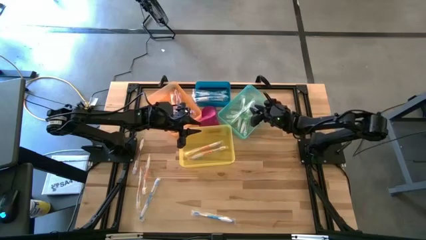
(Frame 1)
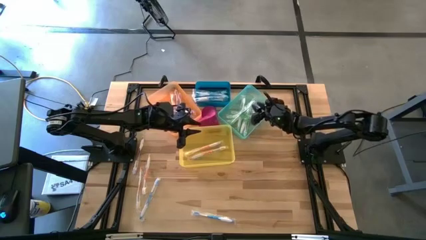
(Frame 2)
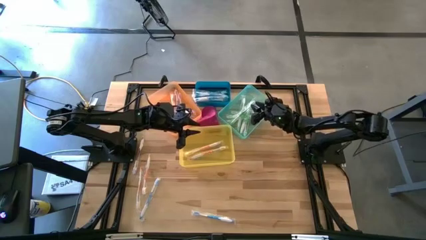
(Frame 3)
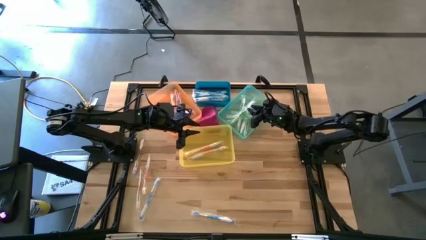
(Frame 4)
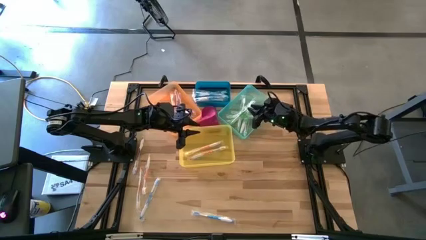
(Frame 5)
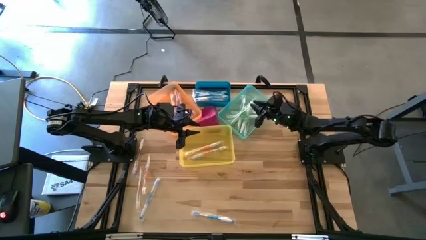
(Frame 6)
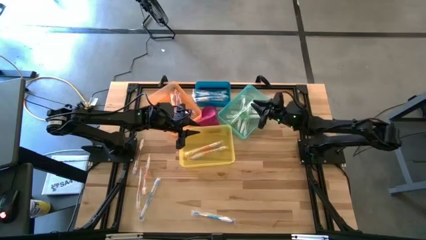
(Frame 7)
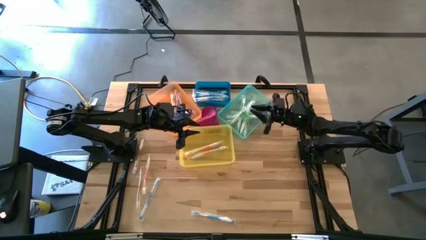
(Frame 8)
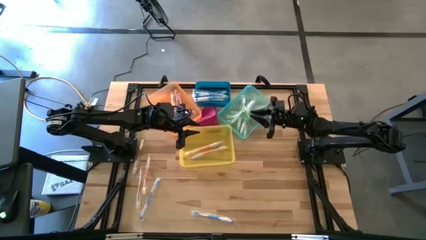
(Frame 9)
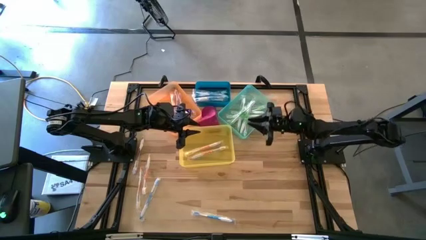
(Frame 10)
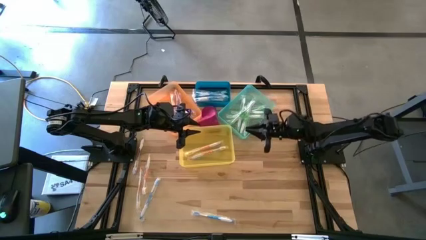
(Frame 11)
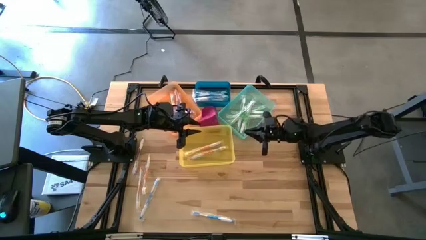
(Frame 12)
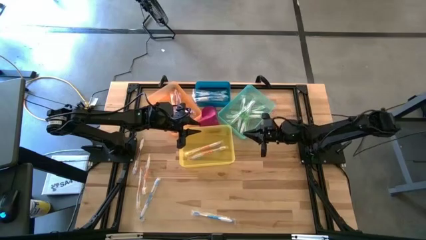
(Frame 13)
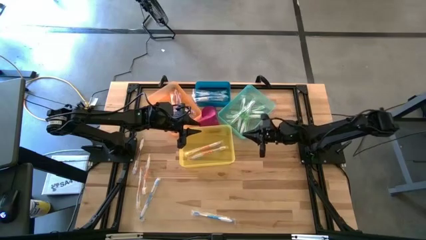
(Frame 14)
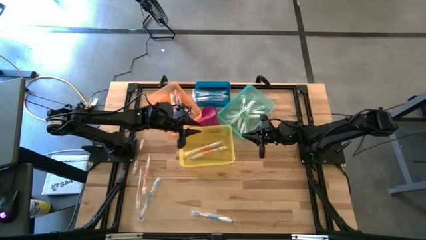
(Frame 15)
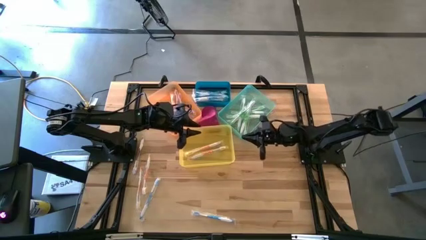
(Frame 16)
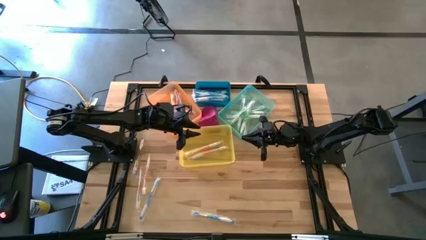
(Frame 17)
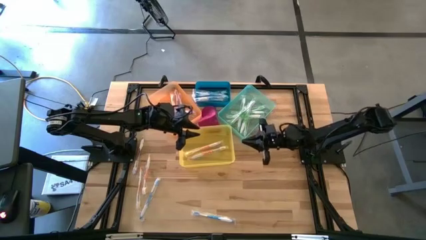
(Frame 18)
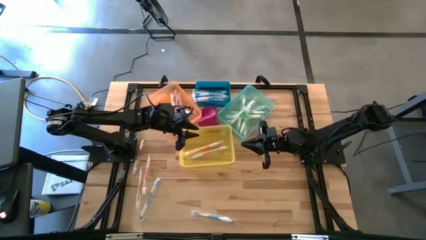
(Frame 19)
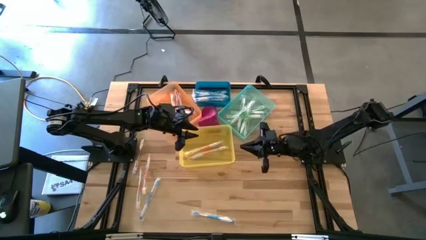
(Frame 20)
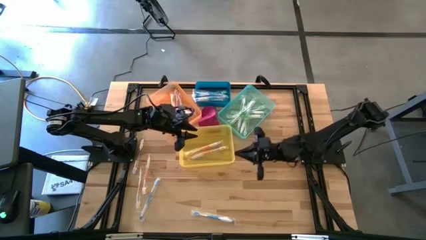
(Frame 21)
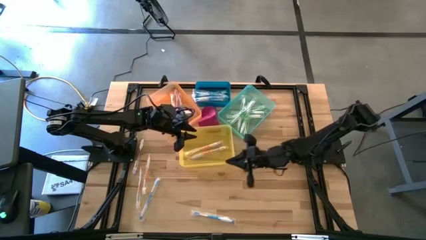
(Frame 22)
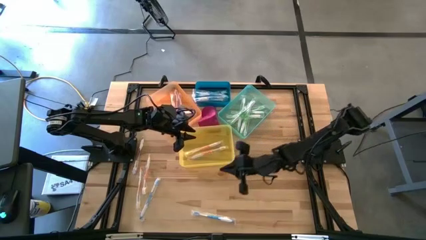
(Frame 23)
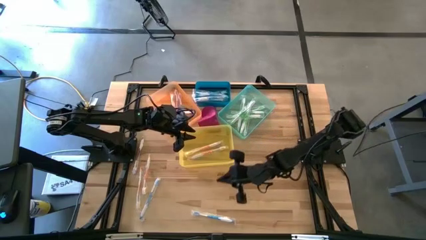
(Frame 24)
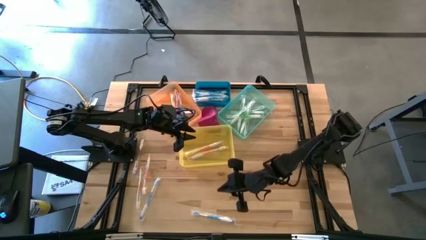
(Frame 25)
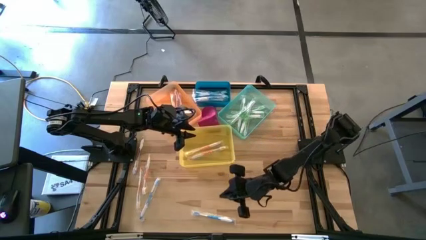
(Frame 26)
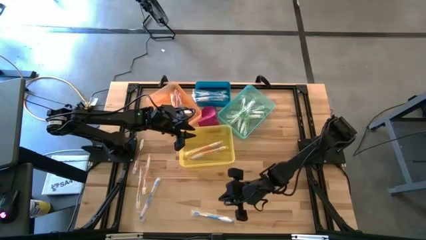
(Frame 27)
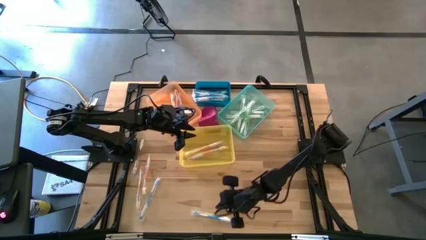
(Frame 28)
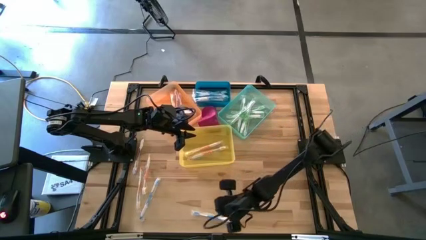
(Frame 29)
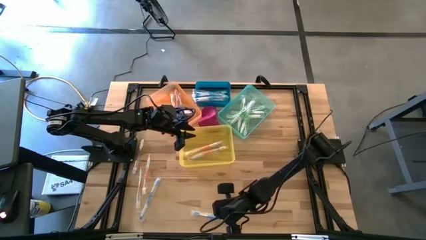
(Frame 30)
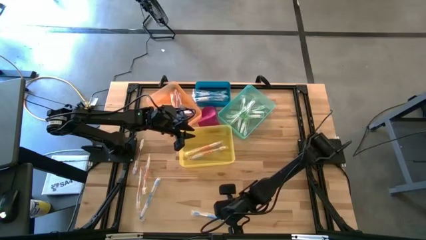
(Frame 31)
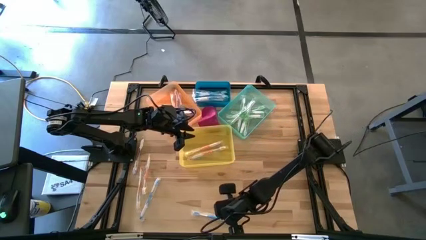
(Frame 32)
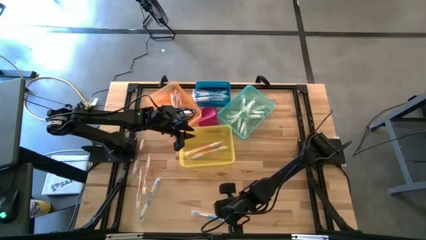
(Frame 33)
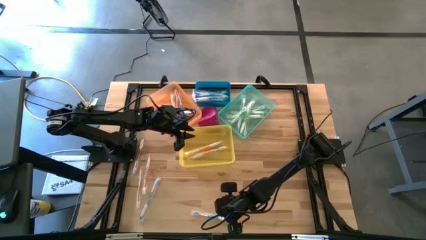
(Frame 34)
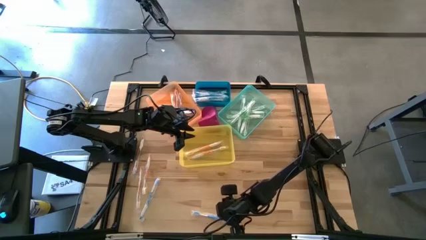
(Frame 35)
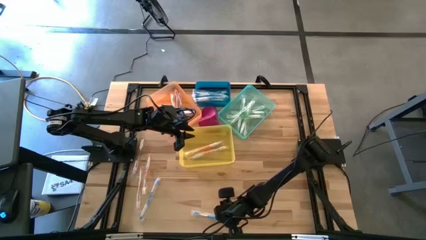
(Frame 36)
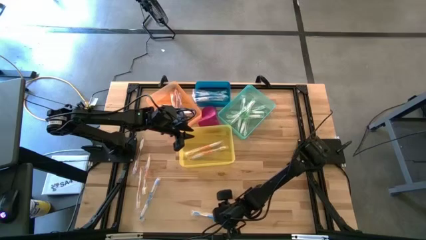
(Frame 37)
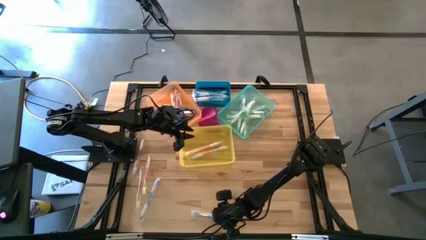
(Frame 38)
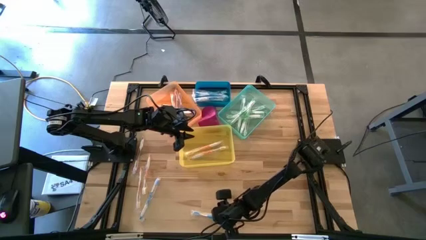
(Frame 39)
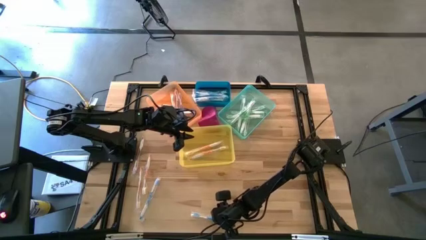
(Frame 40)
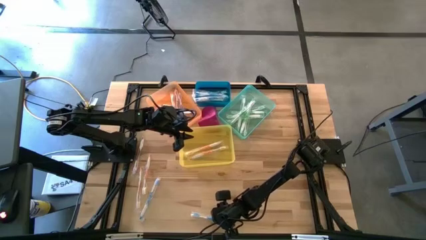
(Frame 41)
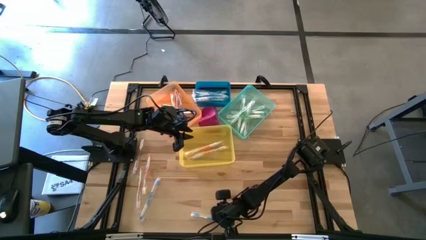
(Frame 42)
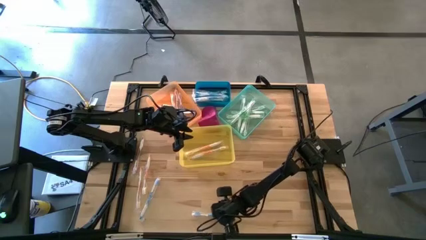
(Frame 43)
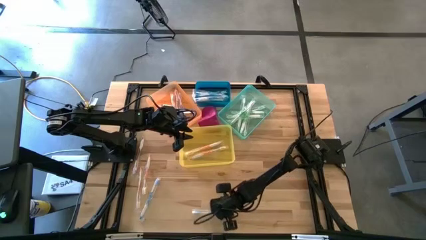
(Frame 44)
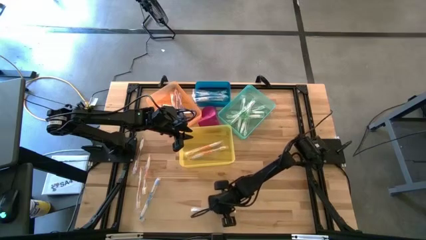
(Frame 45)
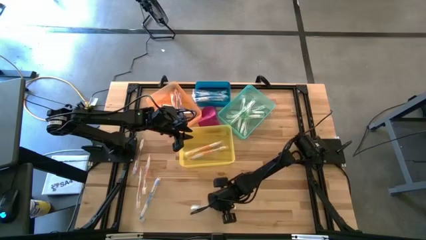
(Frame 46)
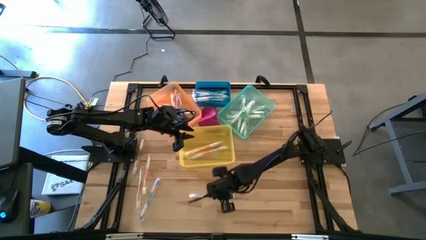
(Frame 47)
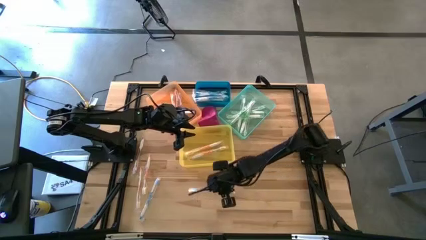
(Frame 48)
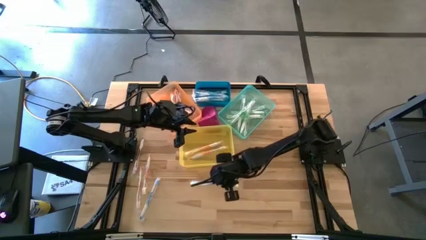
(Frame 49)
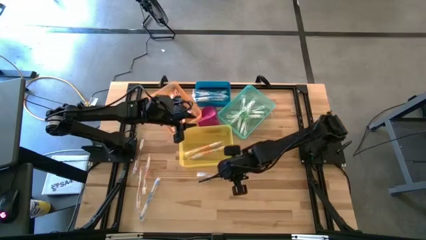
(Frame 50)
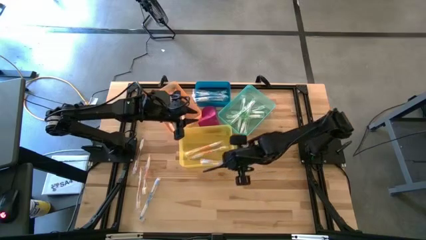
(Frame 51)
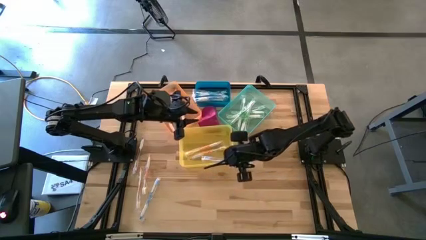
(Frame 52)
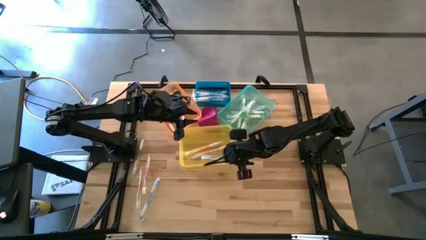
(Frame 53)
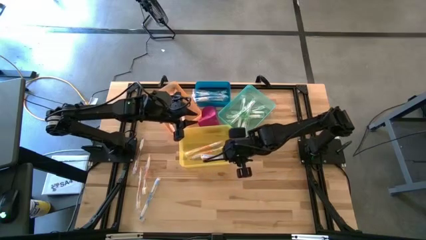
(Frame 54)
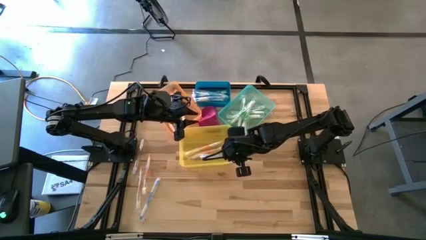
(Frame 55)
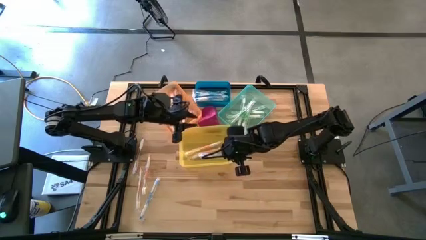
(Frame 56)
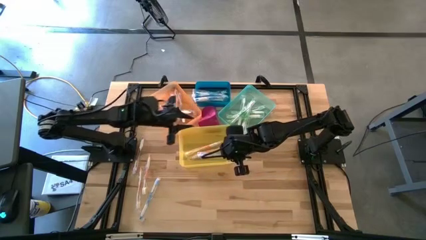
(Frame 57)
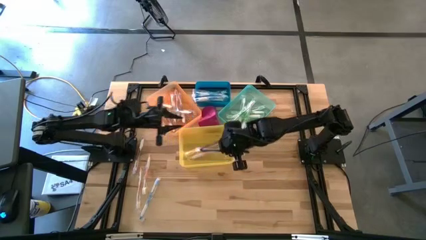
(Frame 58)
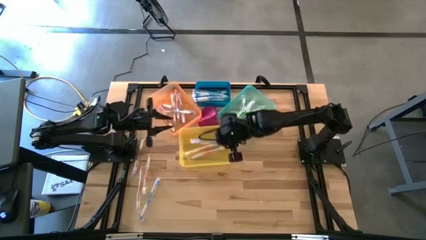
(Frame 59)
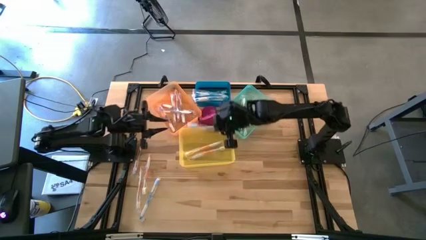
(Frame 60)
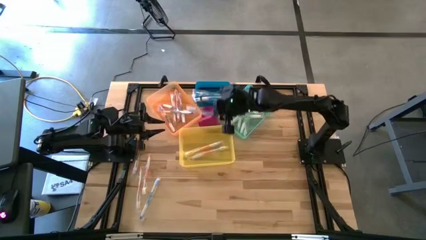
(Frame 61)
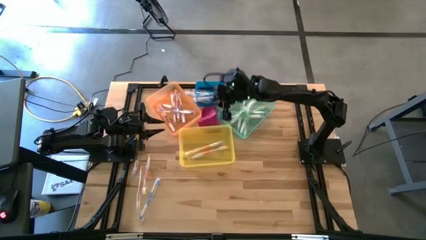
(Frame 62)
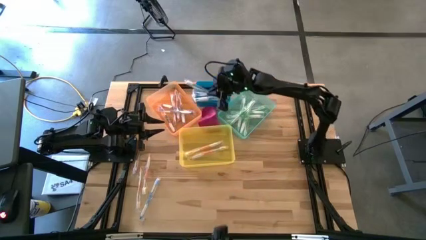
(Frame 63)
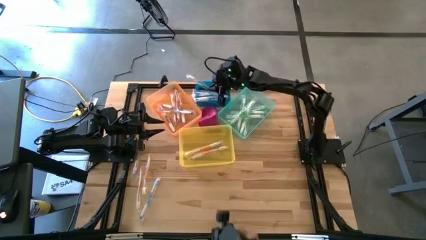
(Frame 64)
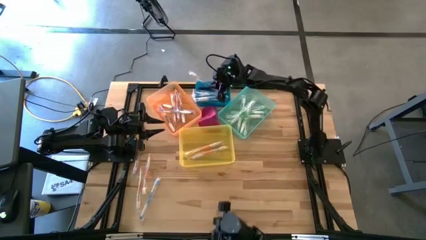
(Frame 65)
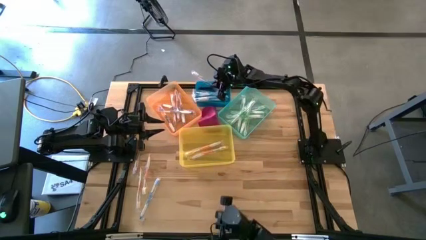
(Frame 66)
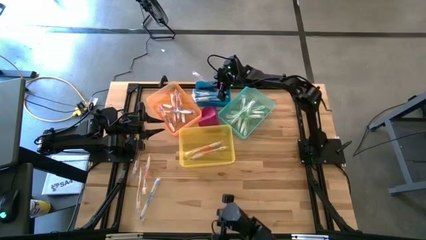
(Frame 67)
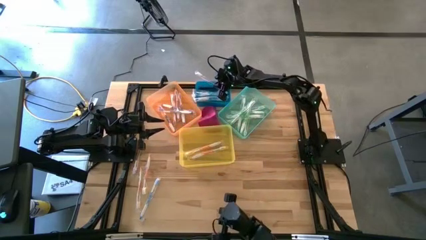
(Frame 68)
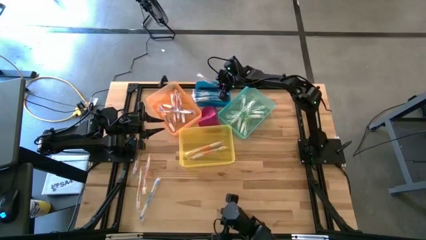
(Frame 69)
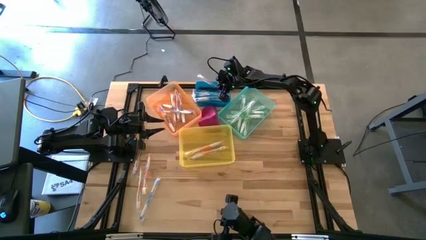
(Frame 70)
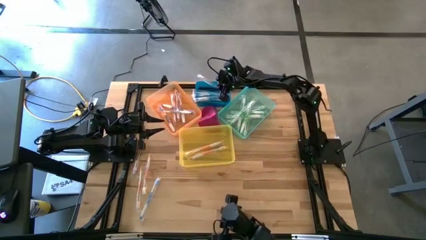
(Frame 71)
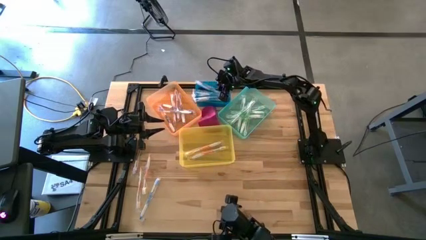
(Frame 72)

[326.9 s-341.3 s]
Task: Pick & Place Toothbrushes
Put the blue toothbrush into the blue bin
